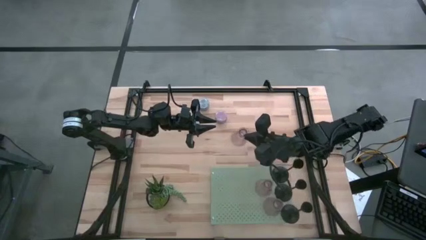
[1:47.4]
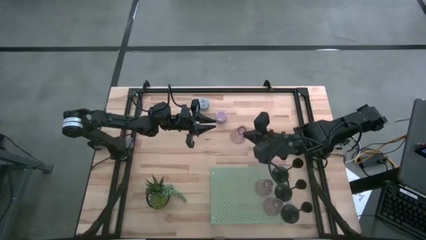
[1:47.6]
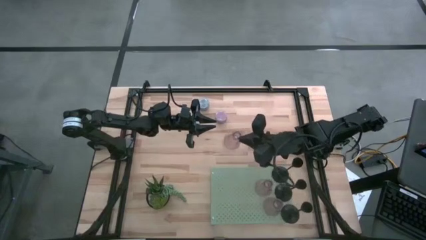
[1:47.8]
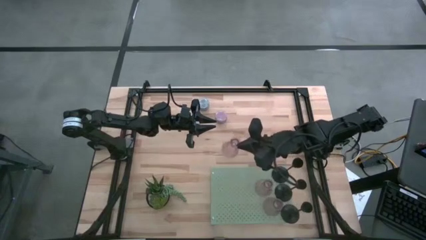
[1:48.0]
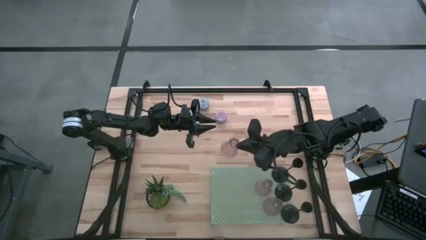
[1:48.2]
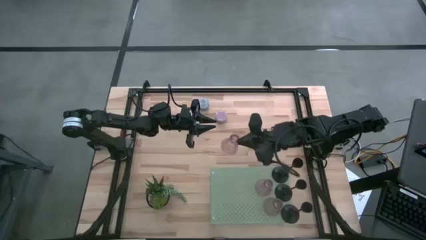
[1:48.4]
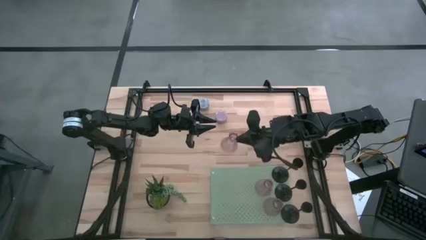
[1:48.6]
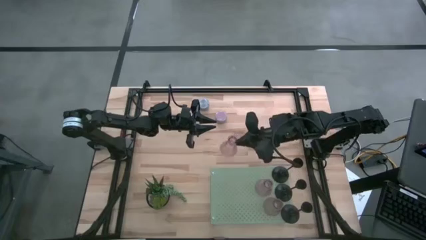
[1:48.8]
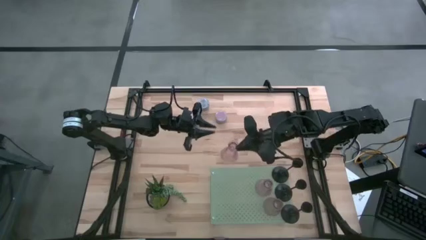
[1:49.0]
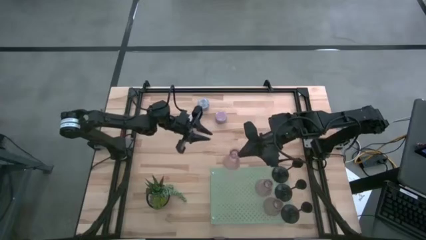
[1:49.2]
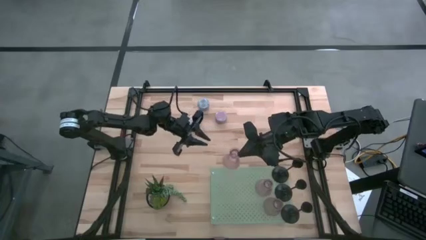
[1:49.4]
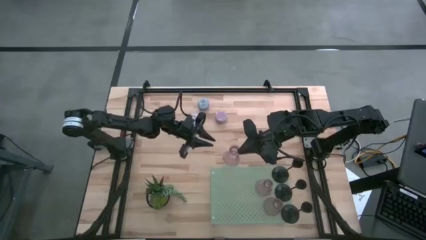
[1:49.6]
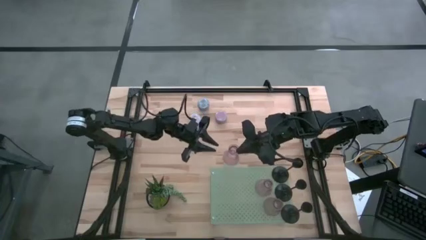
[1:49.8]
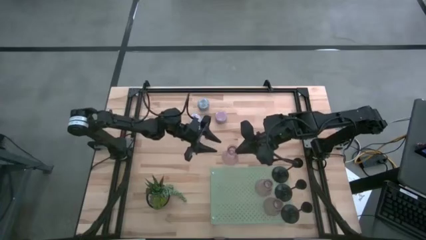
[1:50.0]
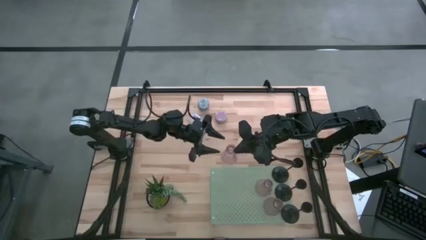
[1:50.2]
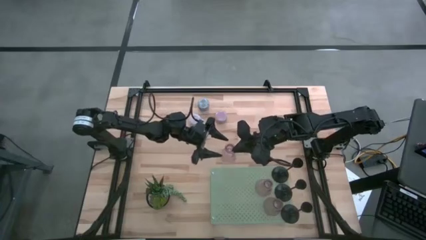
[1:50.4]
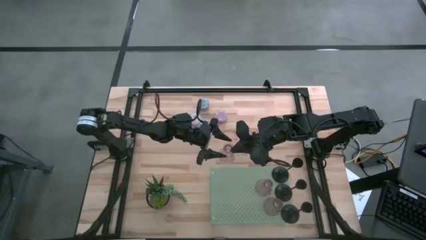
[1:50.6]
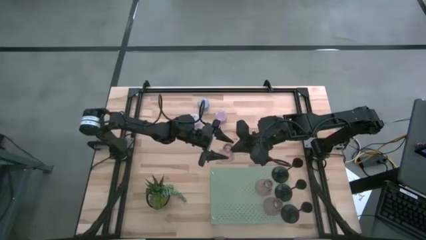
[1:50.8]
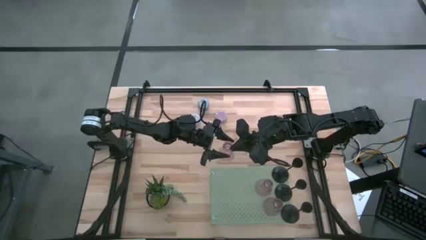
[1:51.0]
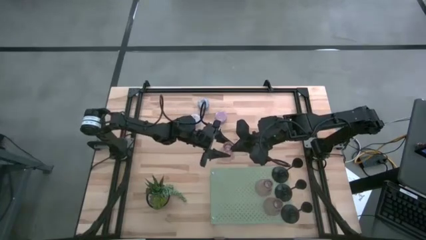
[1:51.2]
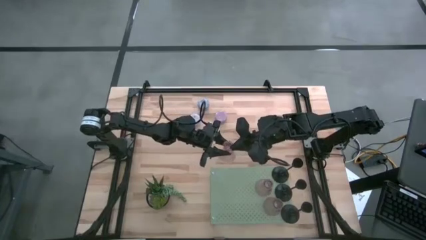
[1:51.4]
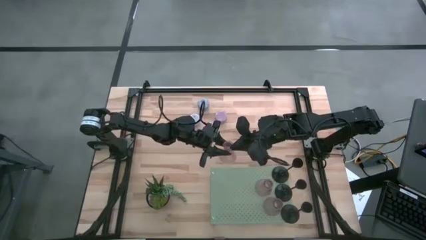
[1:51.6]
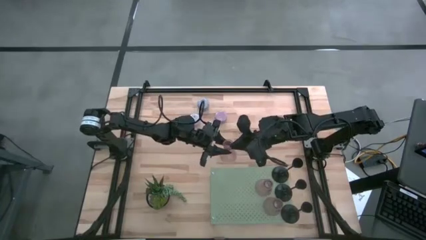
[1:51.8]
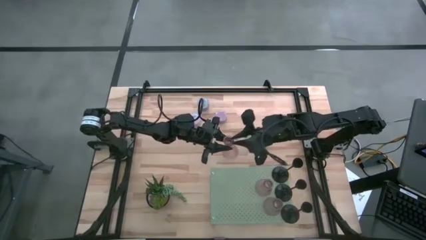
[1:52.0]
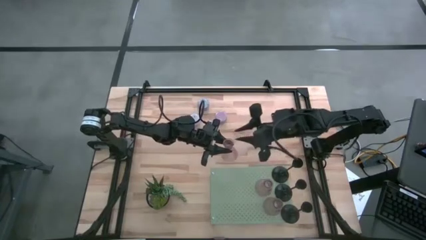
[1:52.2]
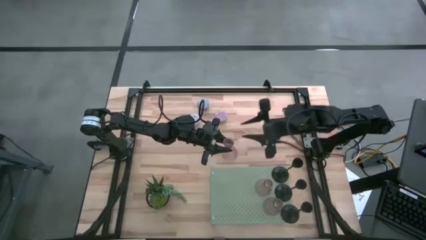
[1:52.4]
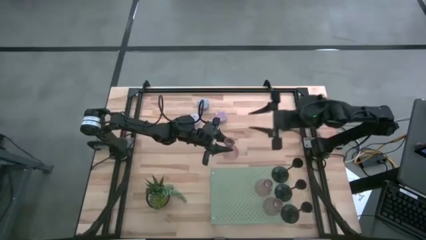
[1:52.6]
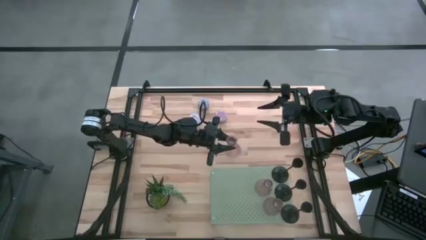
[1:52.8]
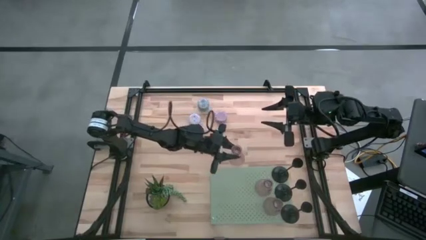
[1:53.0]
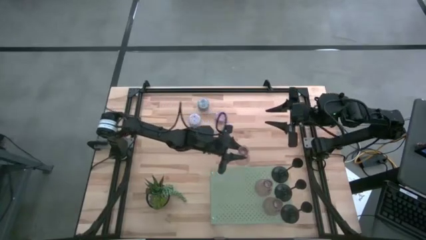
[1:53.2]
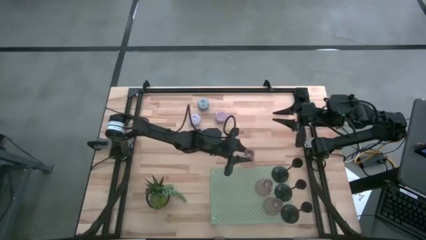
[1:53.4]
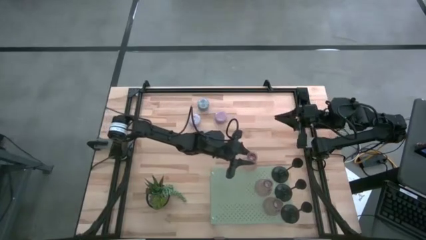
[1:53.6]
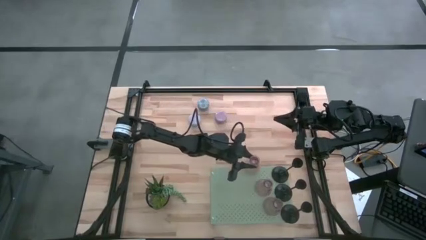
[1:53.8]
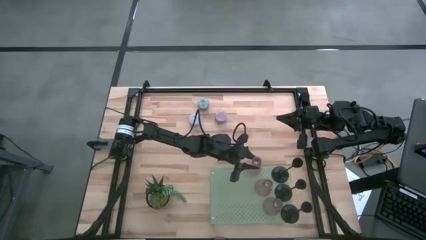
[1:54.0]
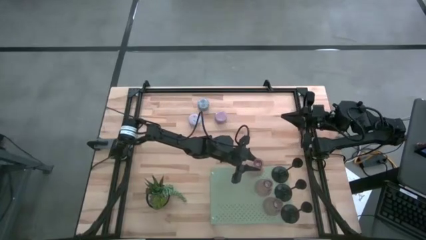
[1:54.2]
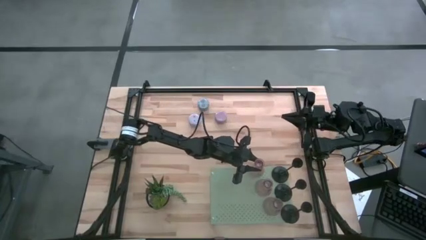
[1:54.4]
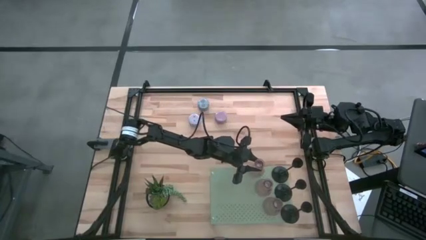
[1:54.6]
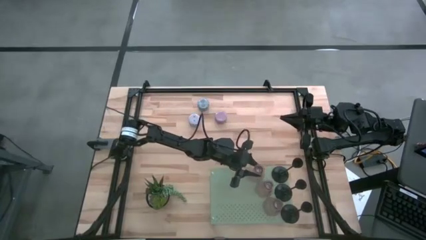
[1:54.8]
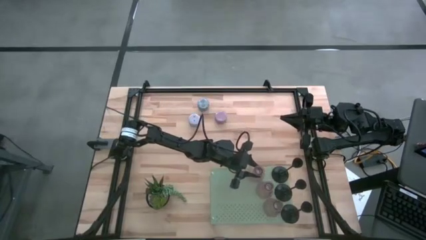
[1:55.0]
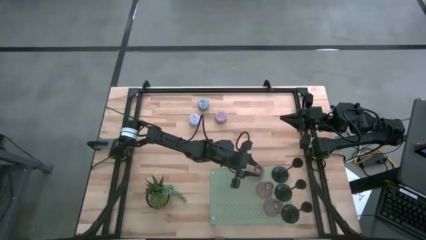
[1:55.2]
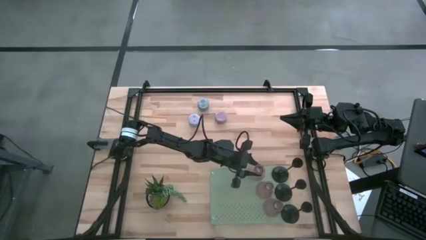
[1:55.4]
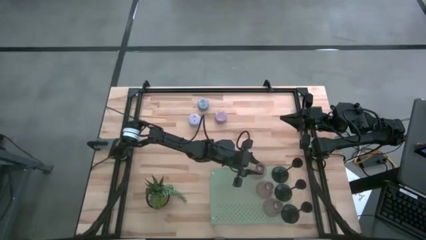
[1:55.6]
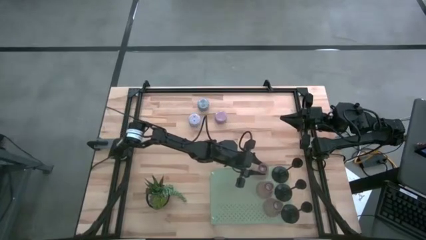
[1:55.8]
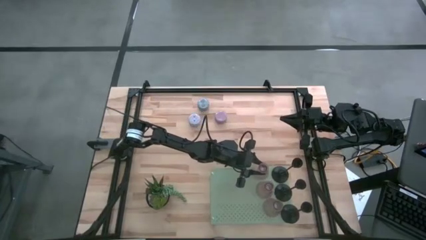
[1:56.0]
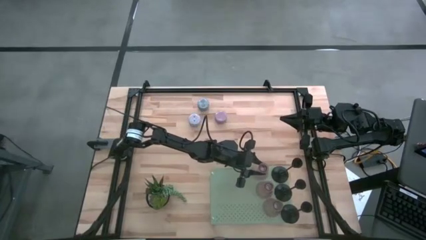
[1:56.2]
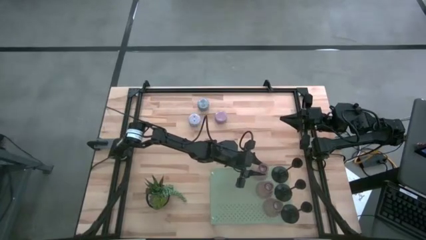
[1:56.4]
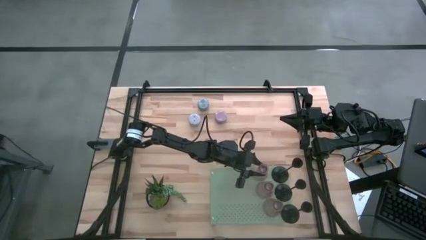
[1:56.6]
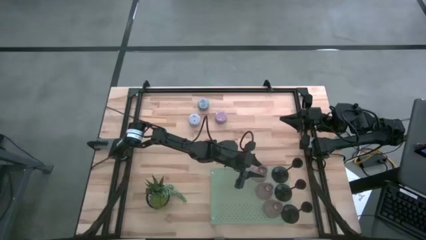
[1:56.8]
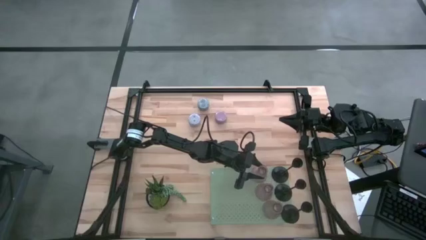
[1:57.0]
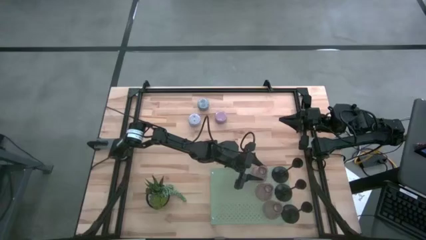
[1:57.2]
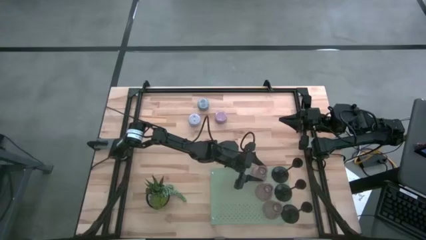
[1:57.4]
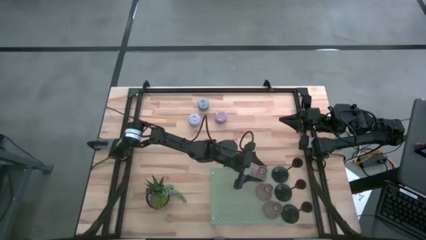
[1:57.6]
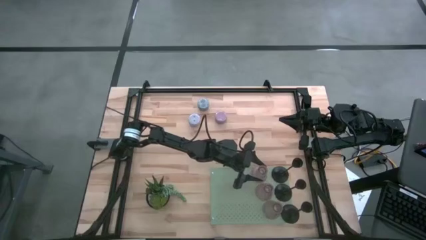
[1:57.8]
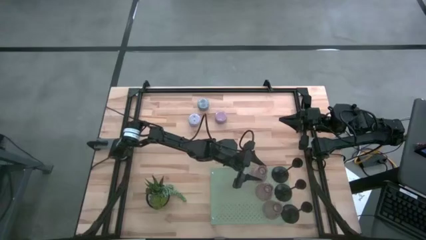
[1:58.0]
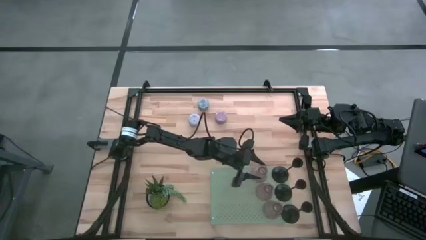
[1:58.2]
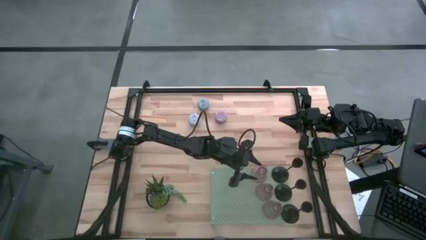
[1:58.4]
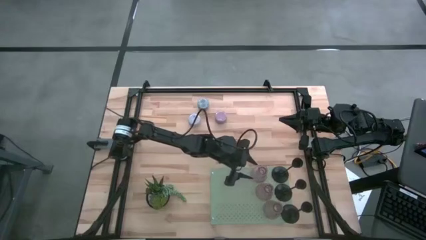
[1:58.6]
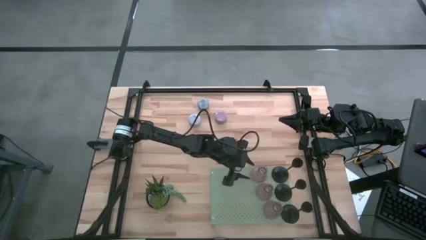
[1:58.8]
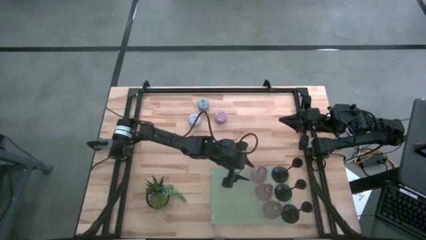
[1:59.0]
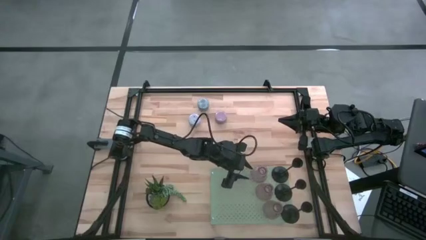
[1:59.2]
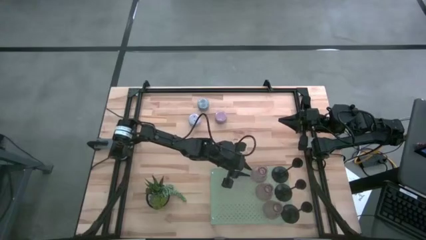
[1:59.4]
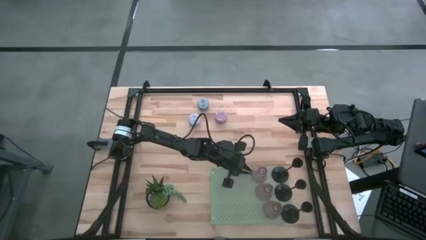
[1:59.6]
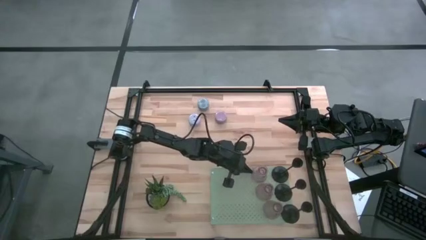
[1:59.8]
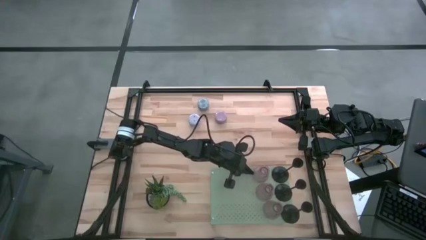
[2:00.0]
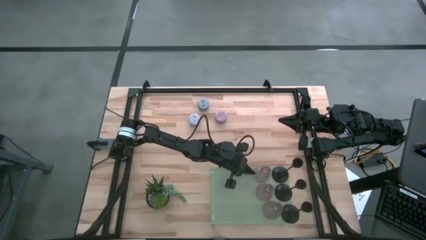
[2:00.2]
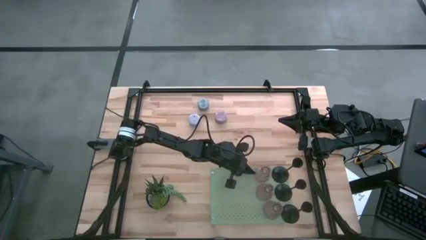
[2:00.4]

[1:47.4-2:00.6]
Task: Pick & Place candle stick holders
Put the left pink glass candle holder on the shelf aligned with the other pink glass candle holder

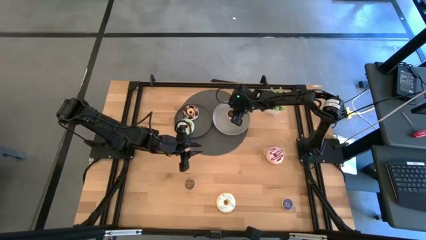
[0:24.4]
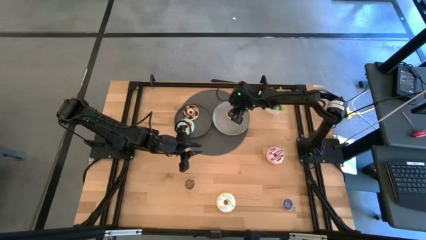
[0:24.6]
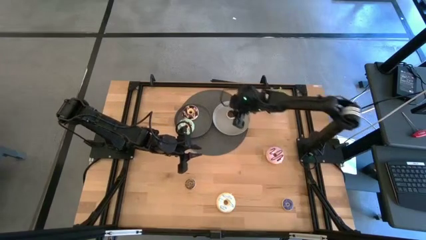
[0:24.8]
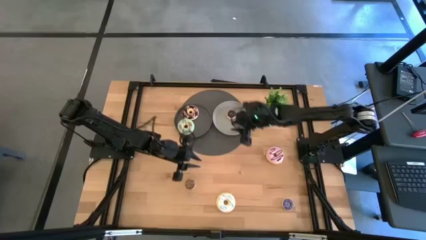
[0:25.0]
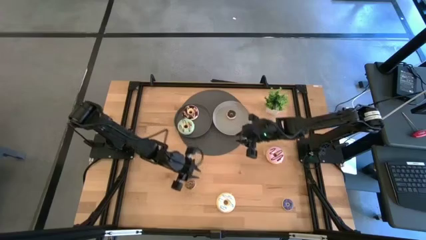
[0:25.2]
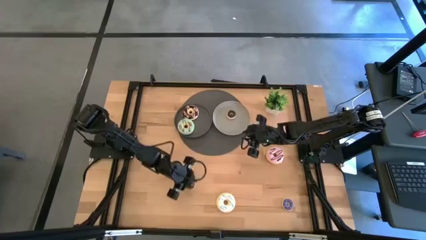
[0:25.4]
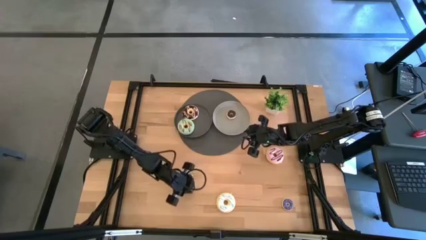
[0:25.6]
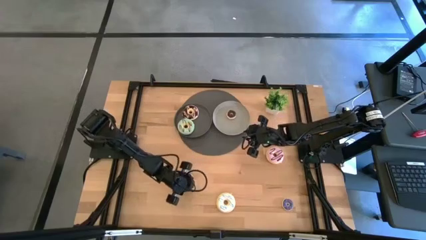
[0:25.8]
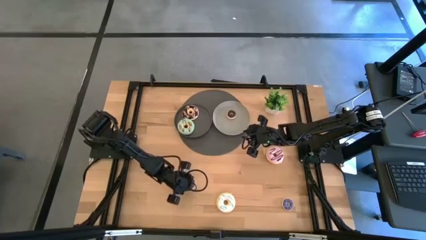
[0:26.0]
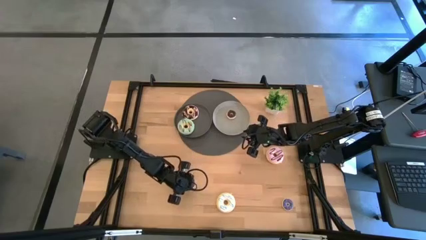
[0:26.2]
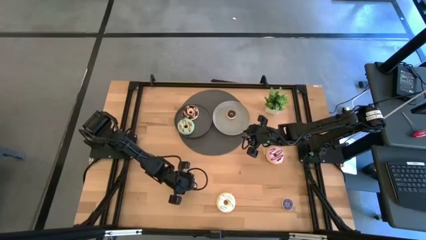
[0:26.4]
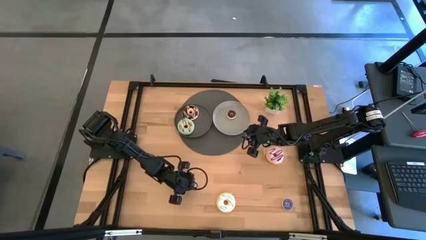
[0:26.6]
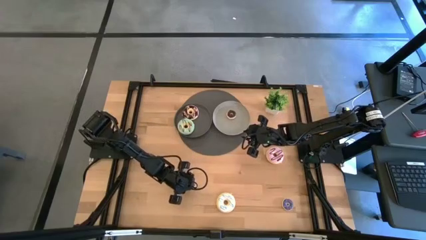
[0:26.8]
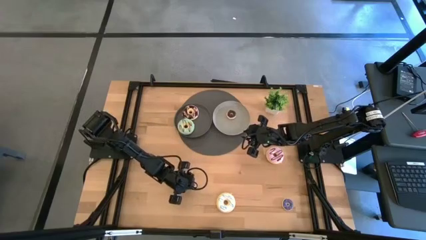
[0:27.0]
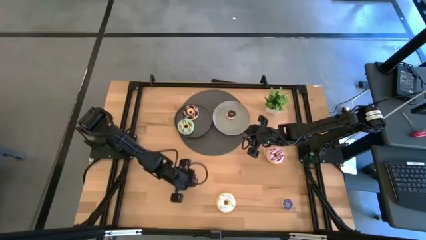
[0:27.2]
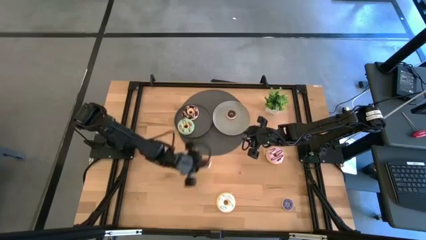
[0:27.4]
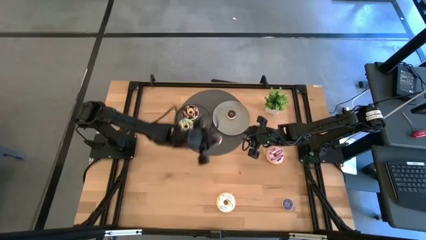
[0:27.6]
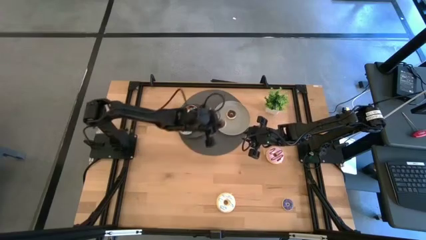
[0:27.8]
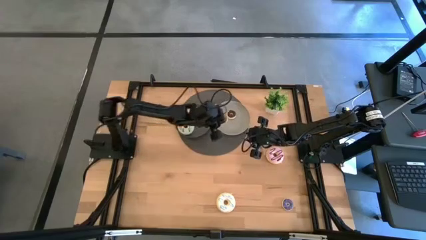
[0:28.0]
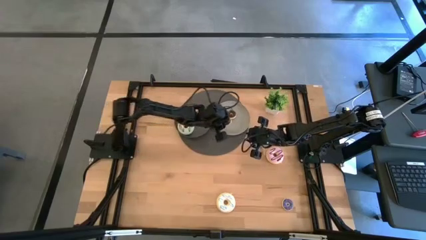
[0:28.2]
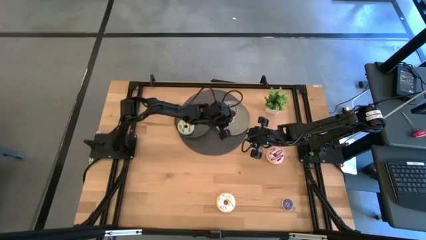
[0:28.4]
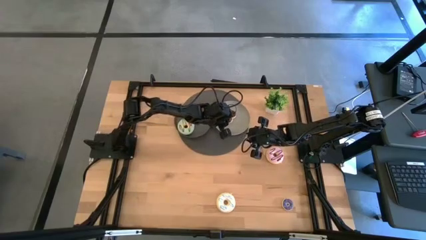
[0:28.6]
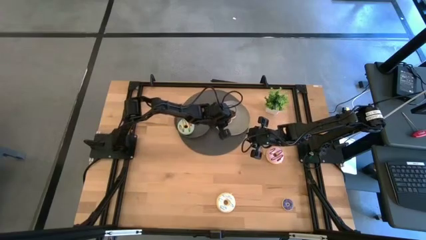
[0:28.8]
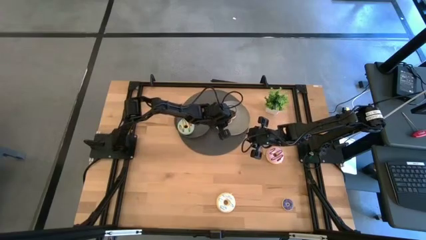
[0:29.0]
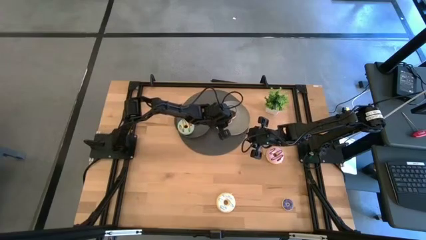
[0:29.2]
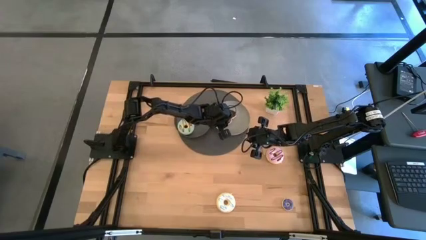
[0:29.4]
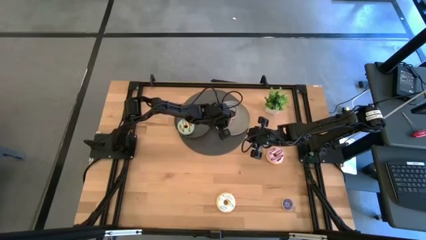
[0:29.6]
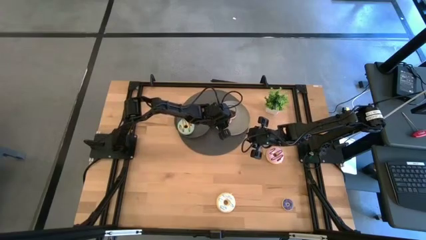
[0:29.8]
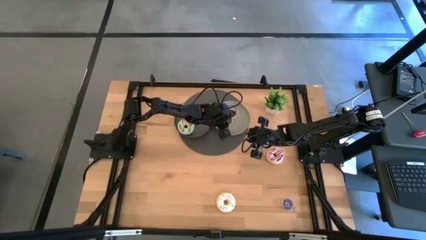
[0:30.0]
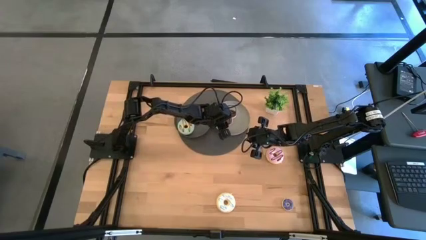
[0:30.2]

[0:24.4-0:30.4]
Task: Pick & Place donuts
Put the small brown doughnut on the gray plate
